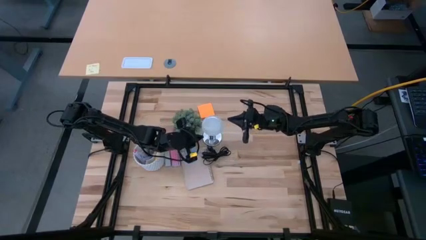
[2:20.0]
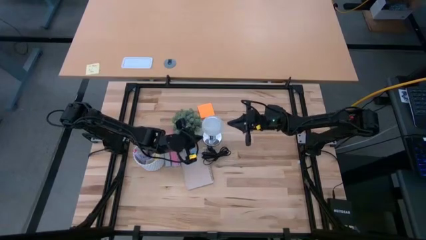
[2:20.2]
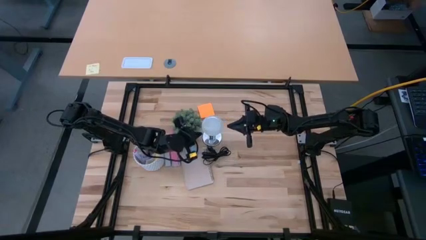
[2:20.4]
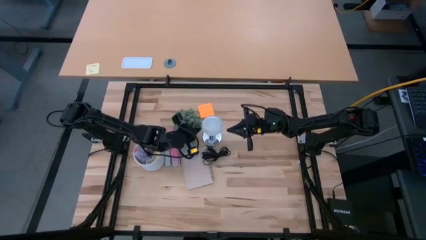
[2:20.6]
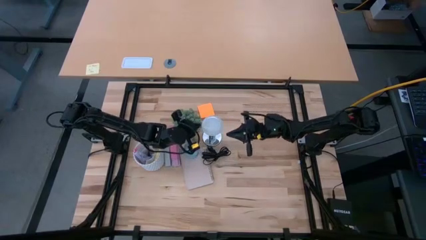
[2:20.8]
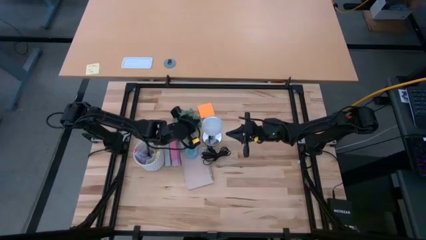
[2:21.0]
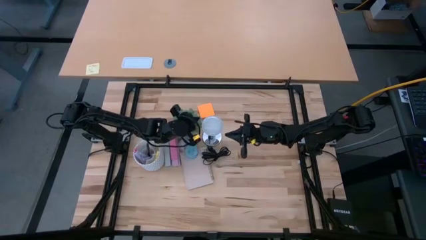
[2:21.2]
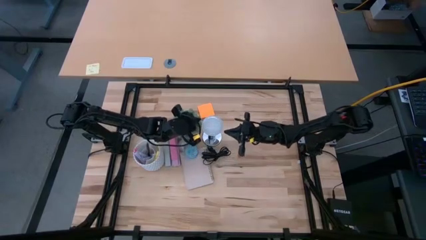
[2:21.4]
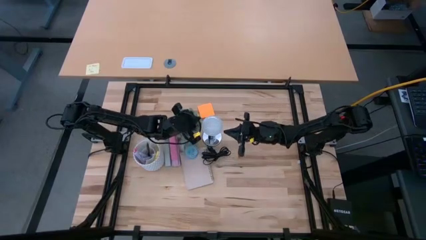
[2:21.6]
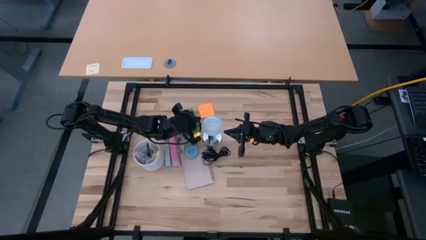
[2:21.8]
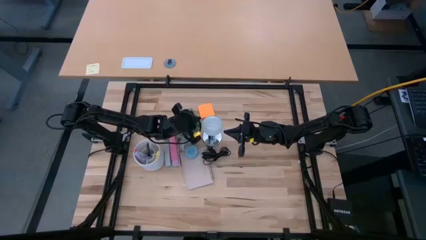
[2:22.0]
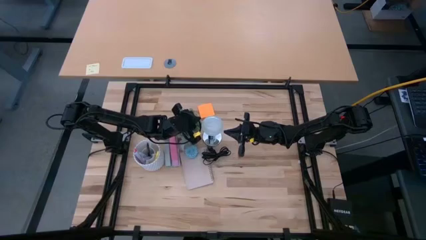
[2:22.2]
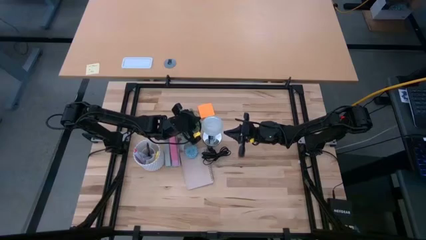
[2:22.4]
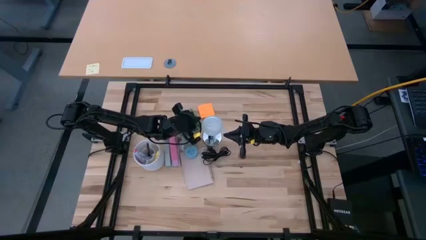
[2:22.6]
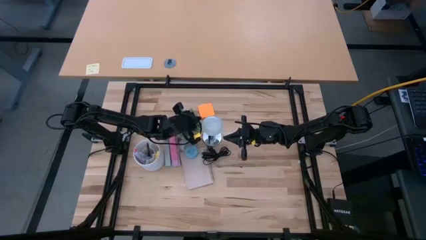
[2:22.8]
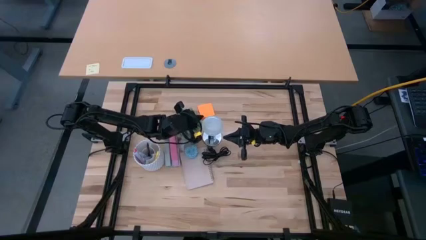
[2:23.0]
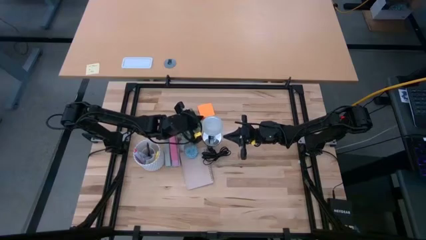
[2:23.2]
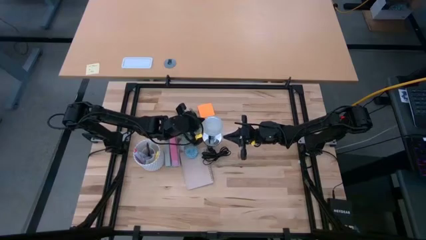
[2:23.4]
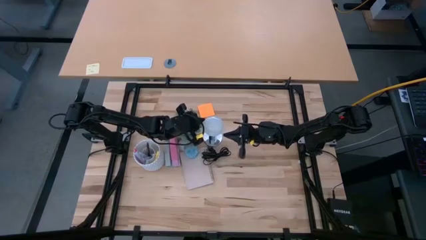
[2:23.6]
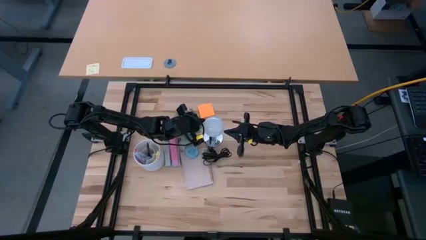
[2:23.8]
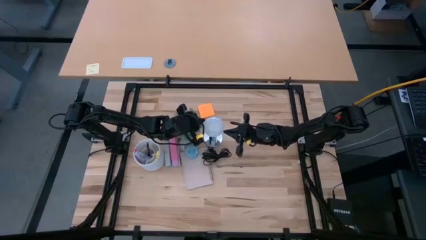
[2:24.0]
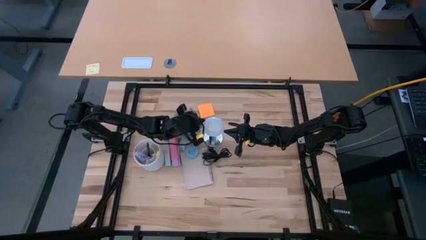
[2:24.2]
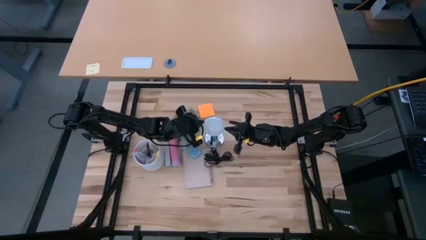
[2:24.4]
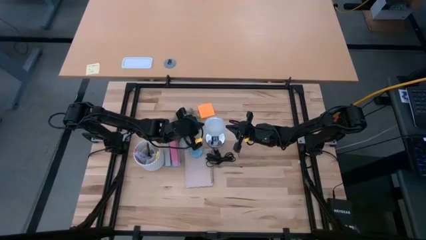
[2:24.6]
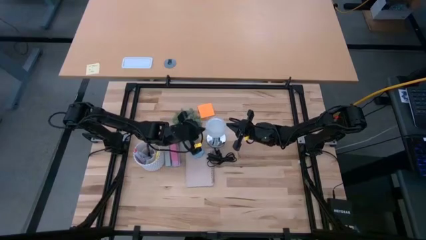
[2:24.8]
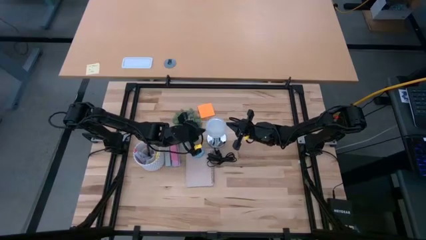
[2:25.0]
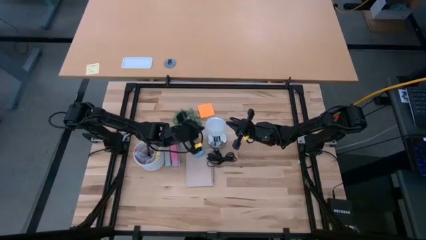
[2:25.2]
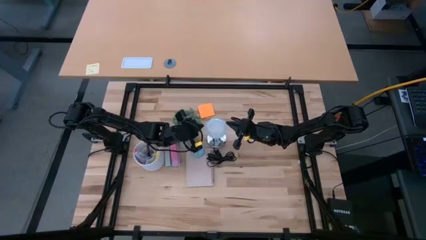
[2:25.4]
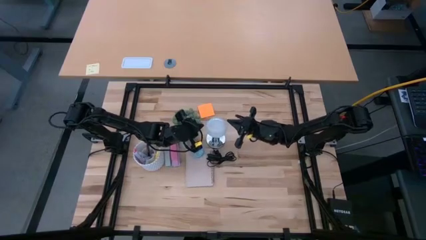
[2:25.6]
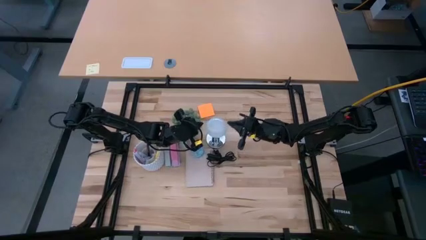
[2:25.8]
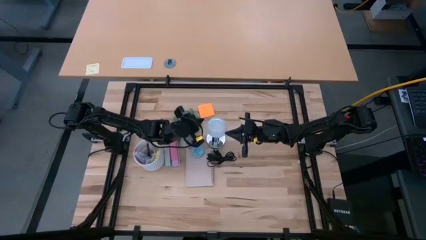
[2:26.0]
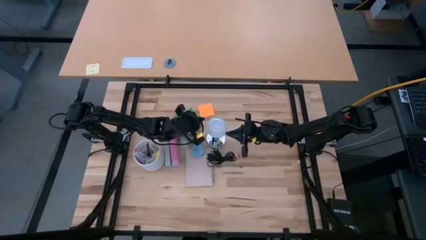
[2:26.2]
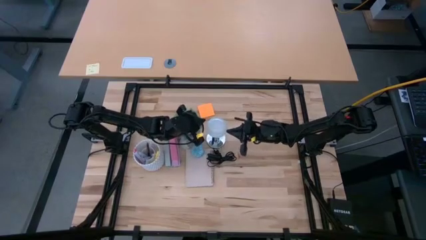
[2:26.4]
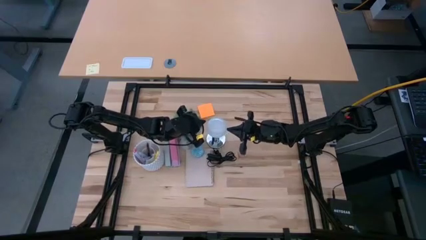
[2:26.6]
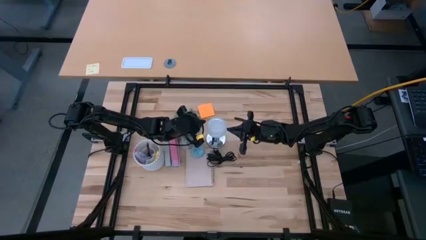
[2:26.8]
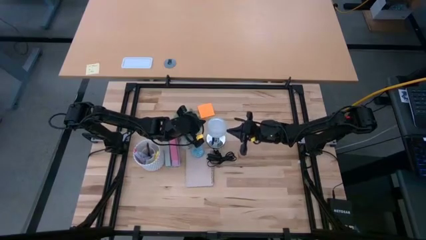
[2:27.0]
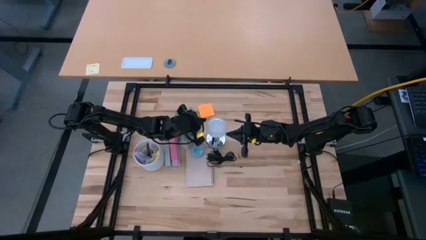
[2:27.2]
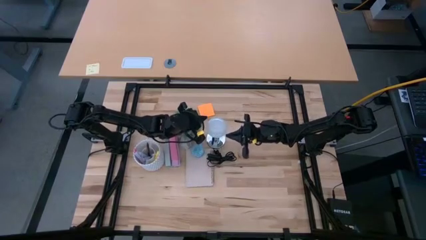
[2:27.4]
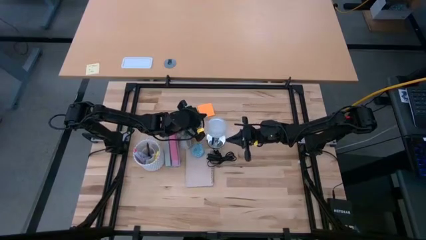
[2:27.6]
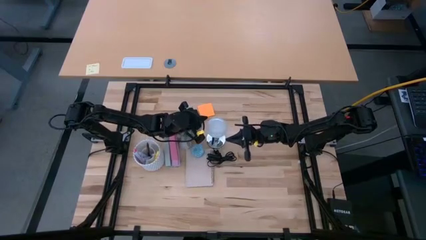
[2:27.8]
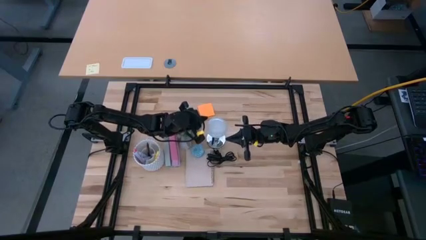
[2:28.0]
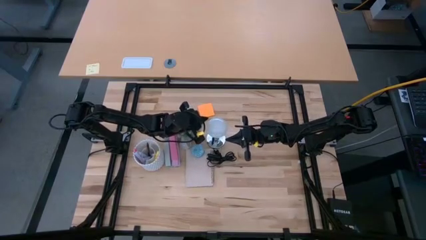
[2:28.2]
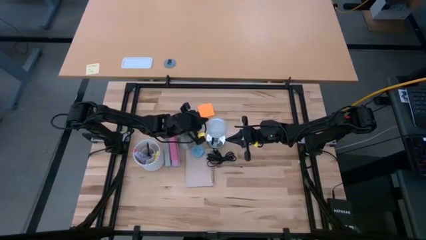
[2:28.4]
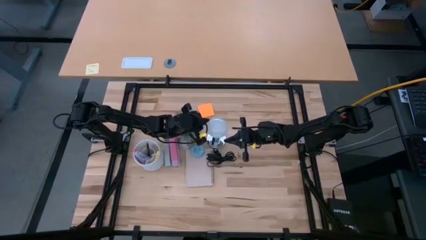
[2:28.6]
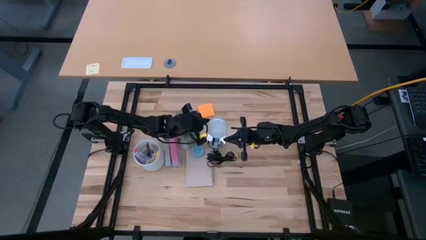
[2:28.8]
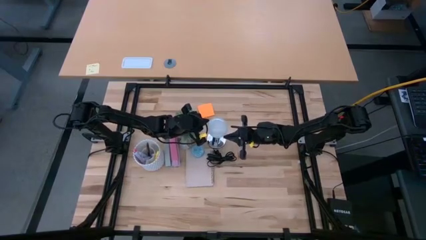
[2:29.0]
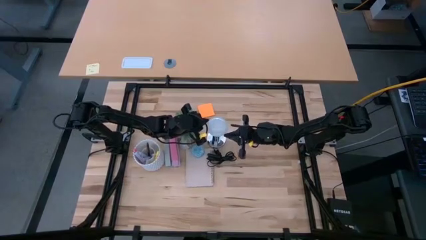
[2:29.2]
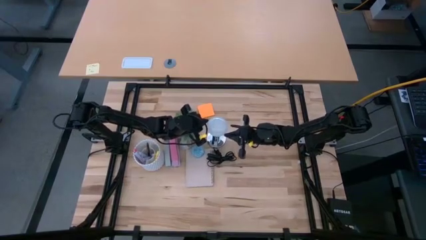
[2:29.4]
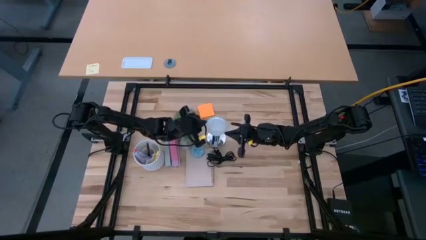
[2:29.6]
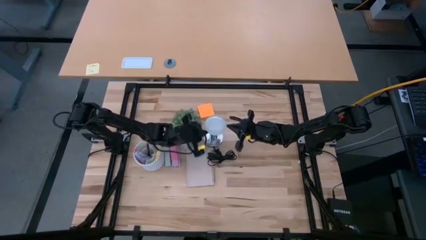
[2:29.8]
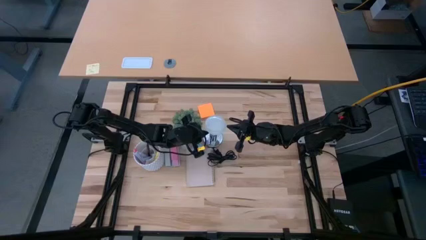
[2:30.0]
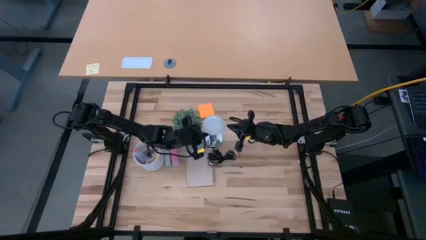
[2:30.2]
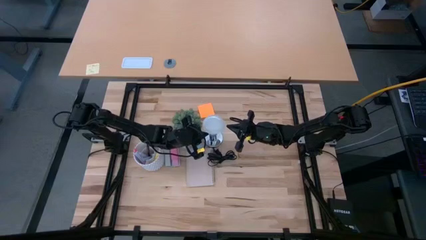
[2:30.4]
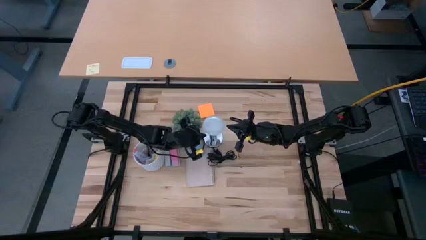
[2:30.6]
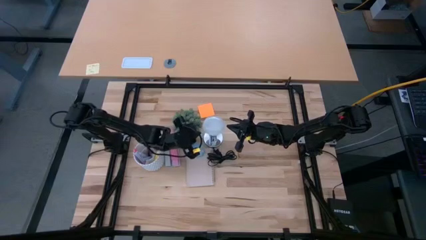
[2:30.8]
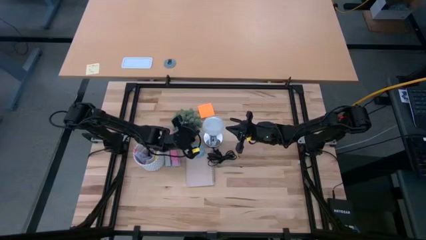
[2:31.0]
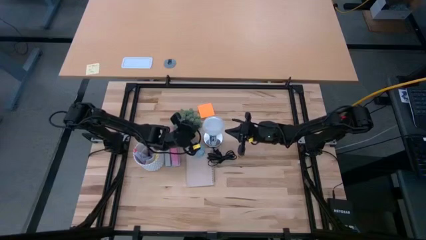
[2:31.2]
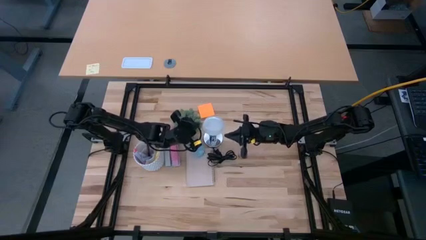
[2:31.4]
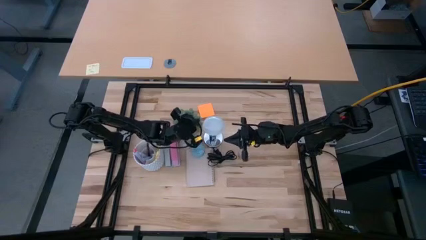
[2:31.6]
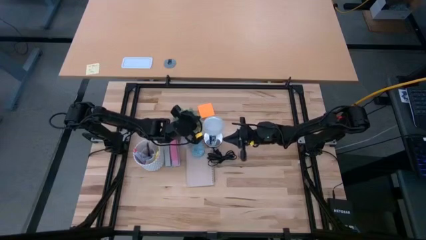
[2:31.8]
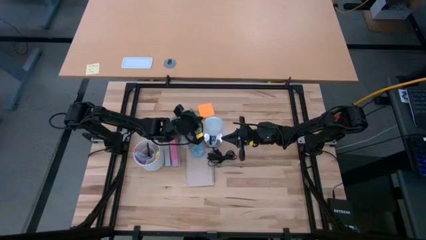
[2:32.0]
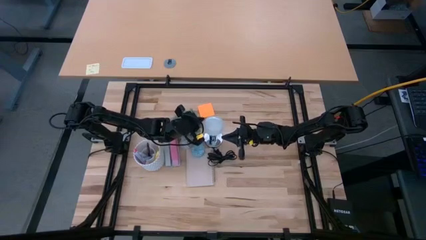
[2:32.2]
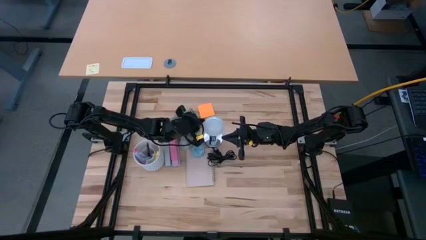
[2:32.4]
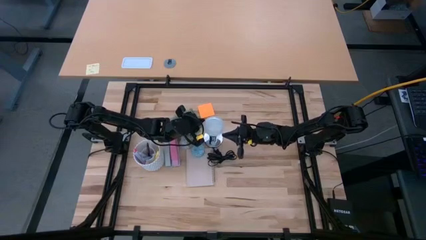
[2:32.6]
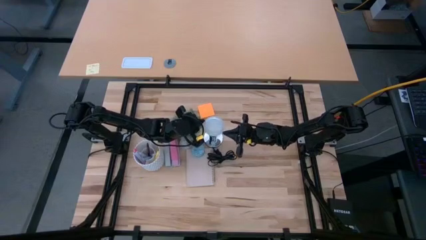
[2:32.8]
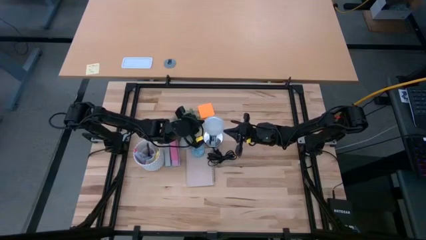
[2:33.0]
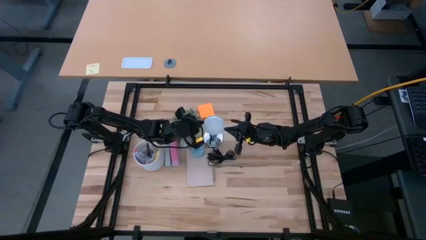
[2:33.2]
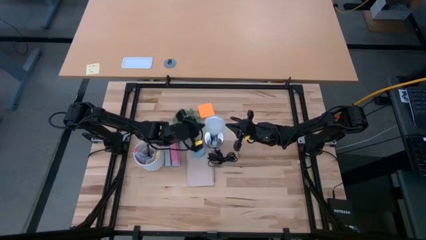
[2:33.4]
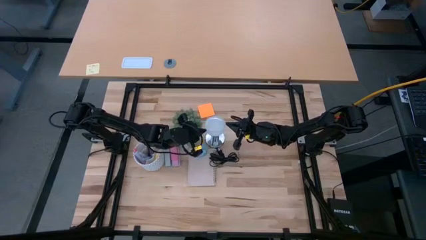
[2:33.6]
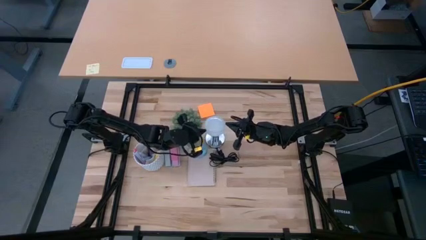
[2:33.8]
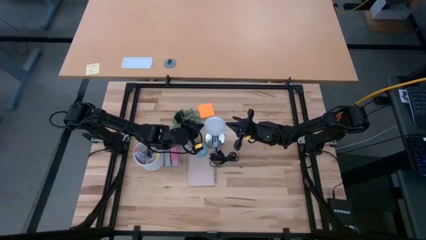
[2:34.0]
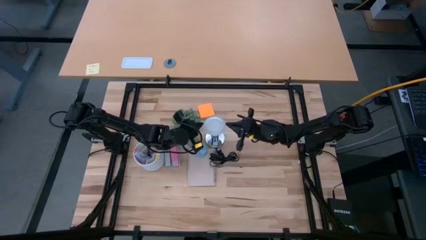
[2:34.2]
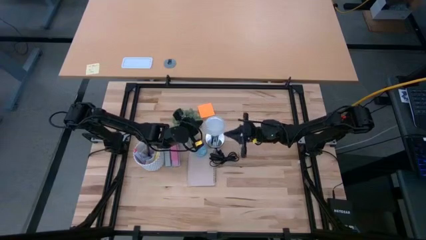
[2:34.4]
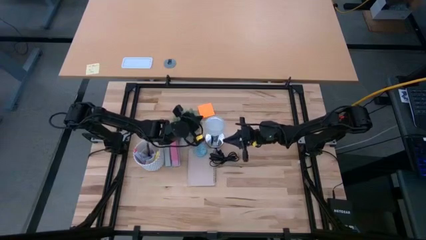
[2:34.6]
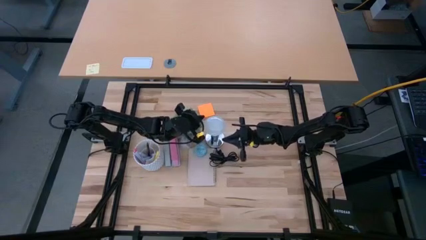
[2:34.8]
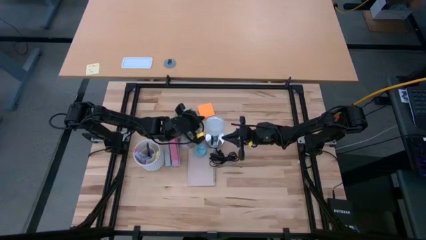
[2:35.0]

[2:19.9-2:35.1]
Task: Screw lightbulb
Remove the lightbulb from the silver lamp socket
